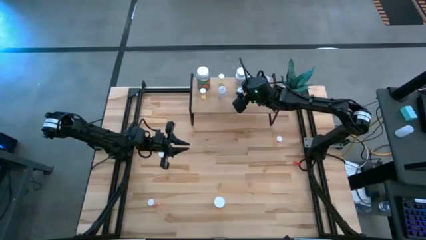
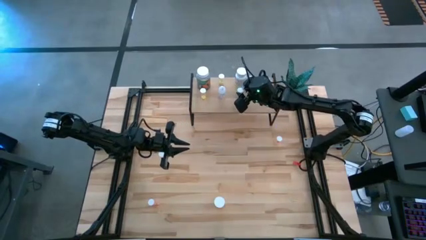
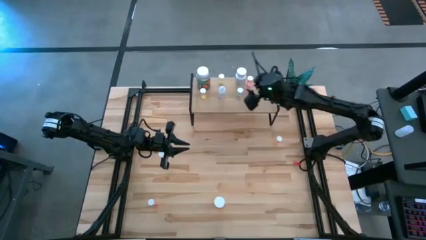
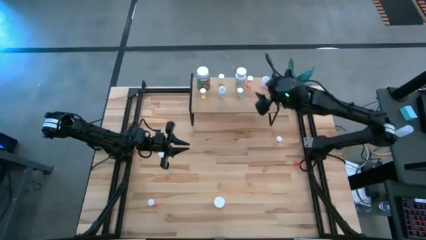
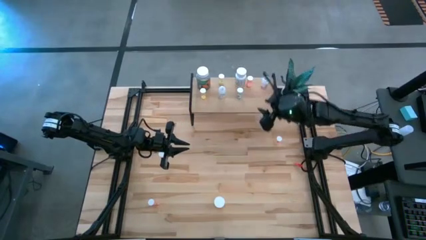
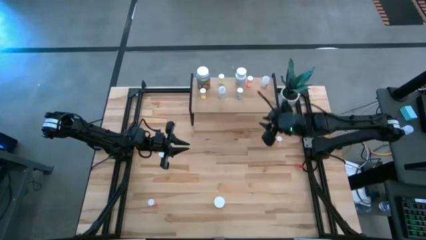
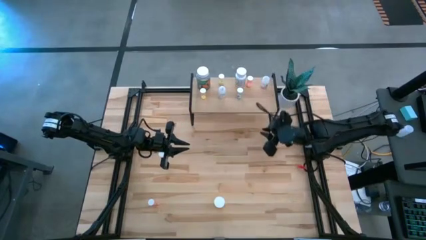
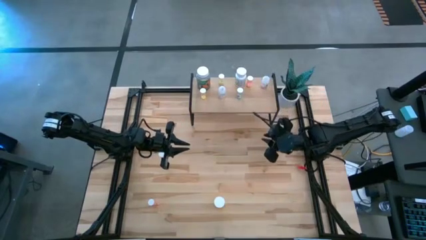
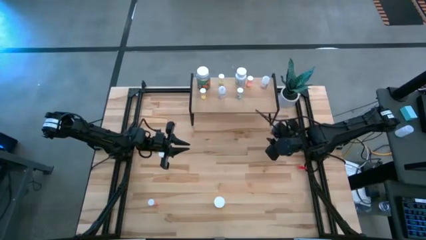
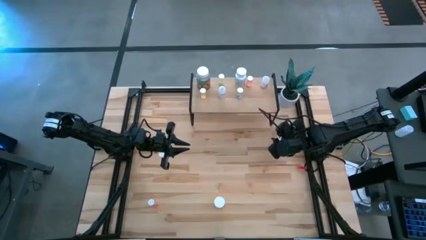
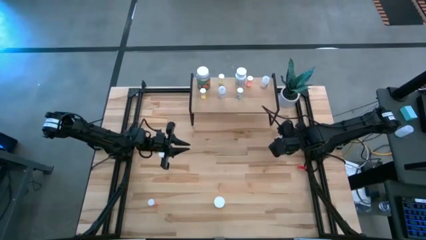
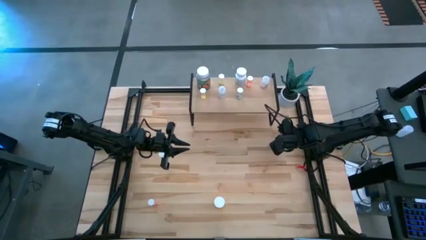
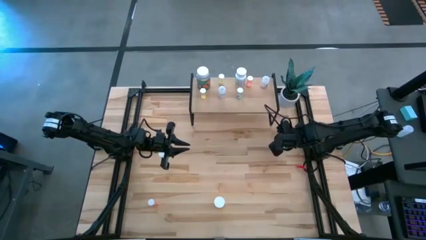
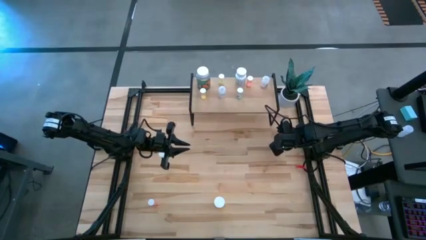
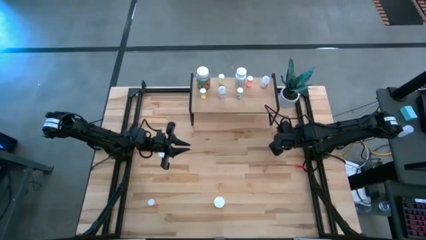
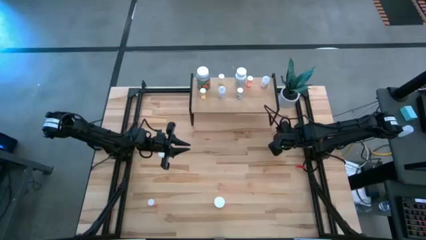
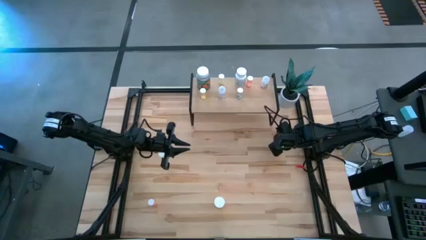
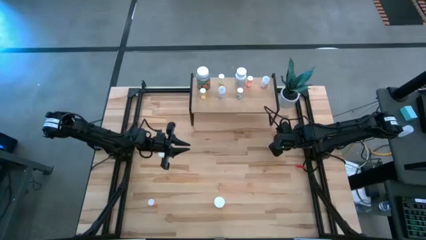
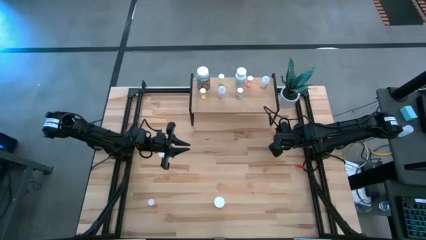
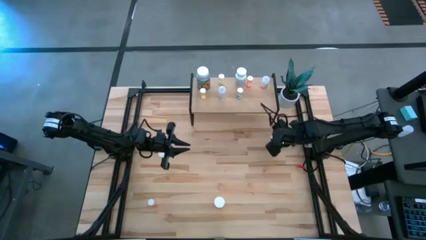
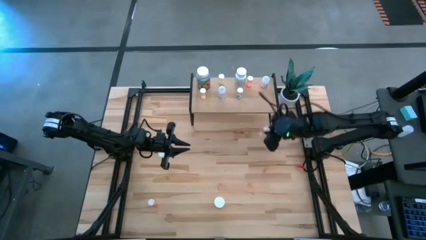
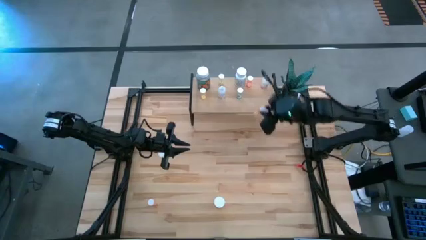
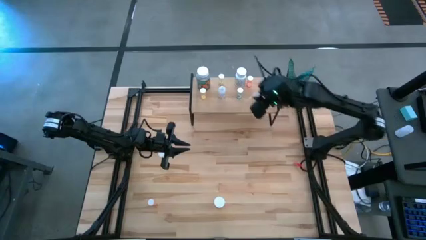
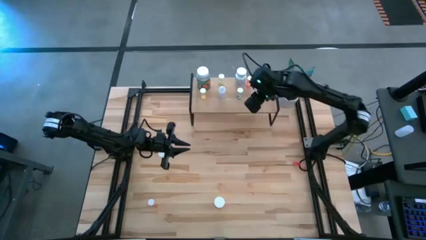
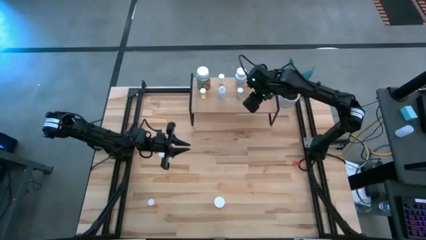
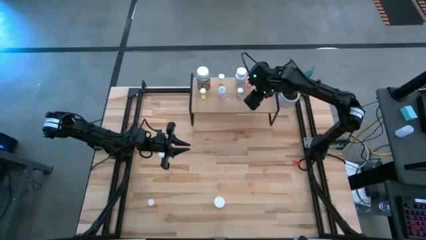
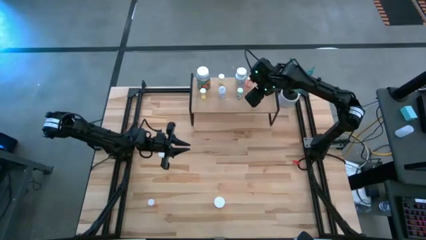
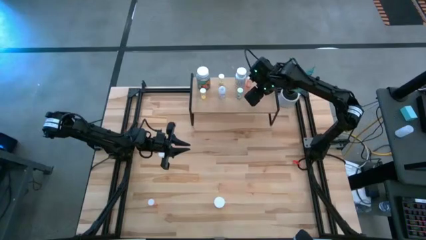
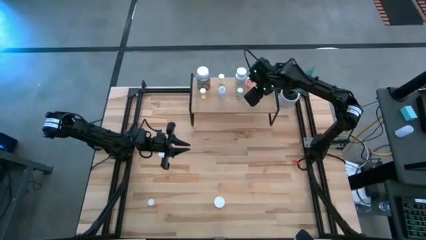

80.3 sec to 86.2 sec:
Task: Pick and place medicine bottles onto shelf by color
Put the top pink pill bottle on the shelf

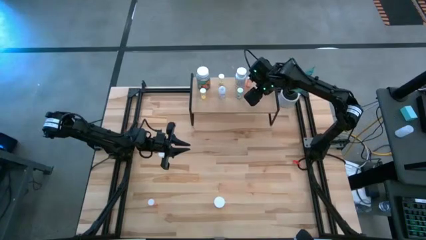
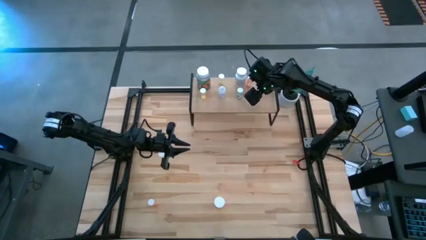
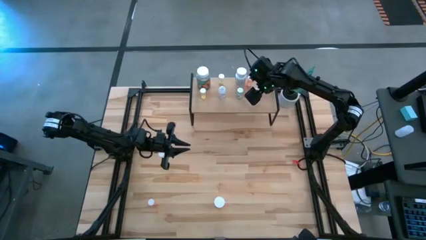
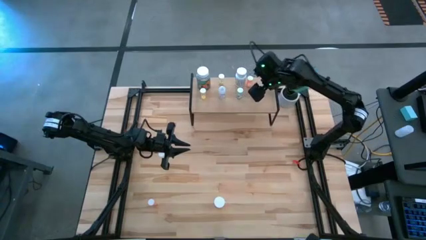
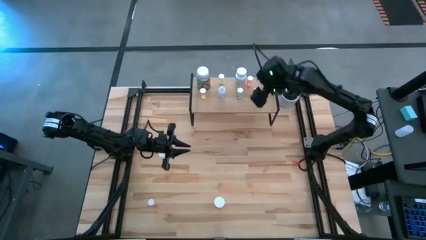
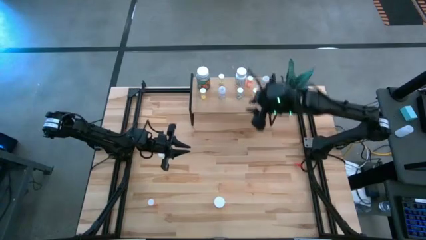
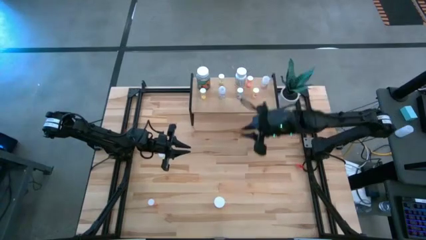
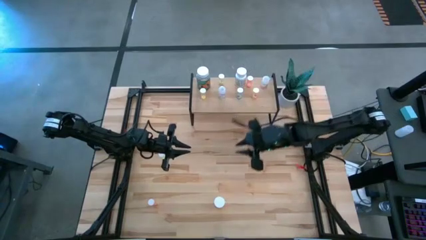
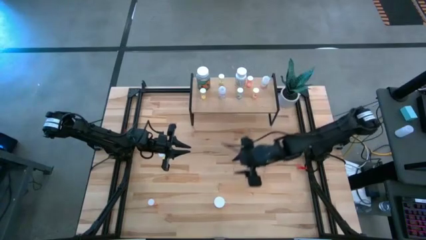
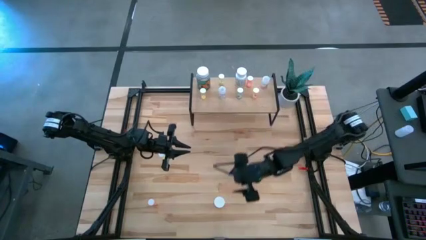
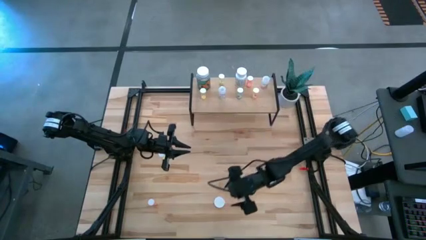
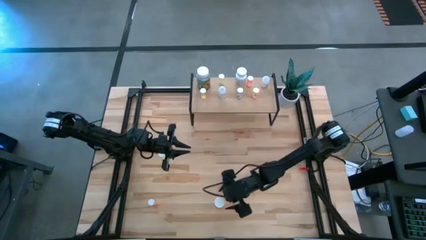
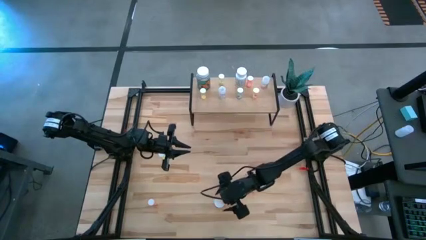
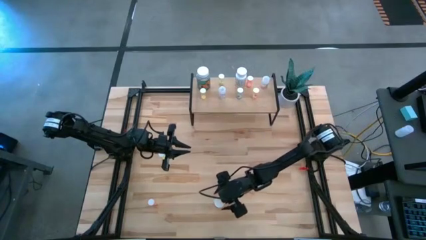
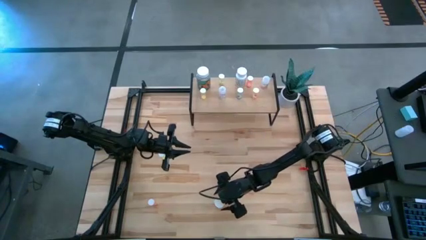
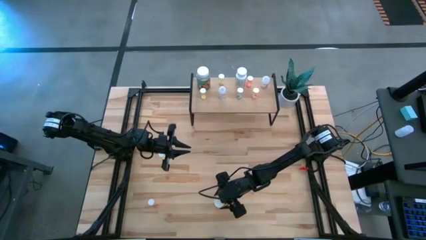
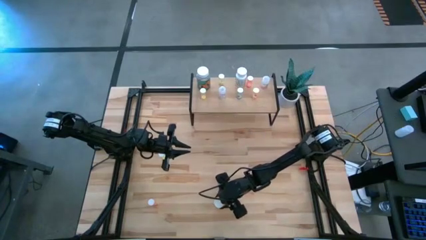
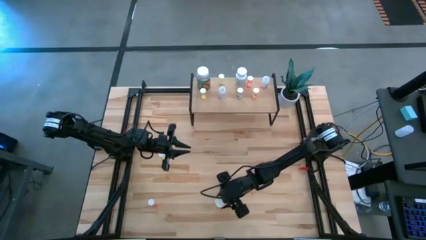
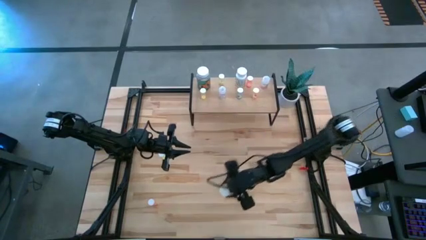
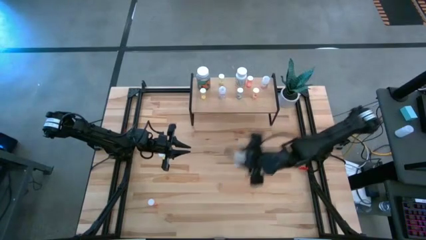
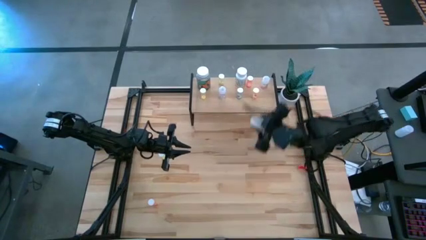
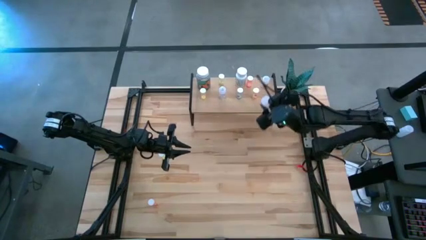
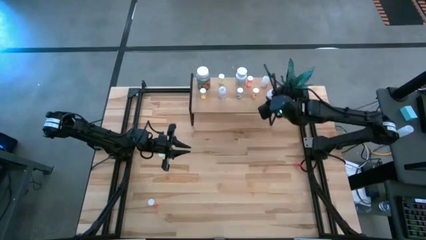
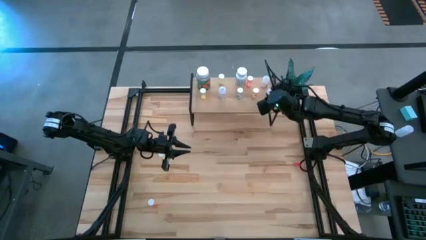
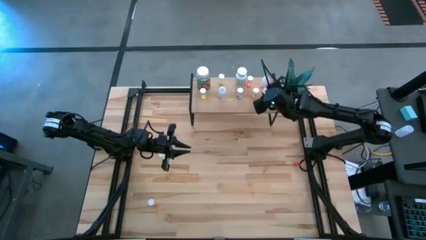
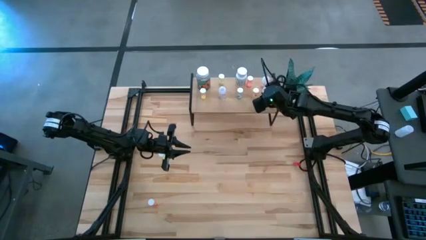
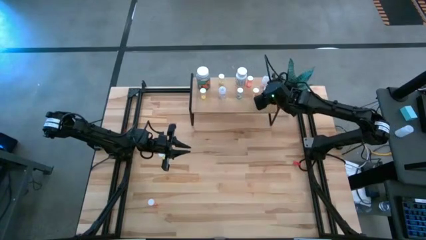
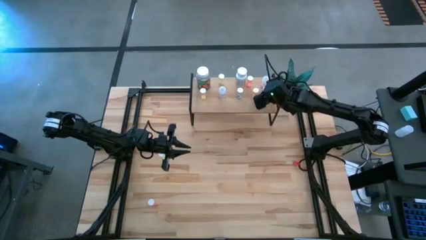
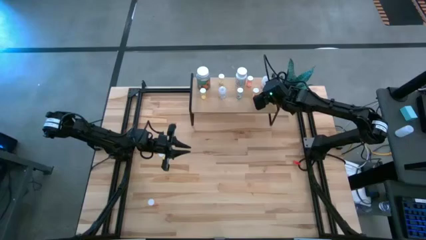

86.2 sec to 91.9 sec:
Put the orange pill bottle on the shelf

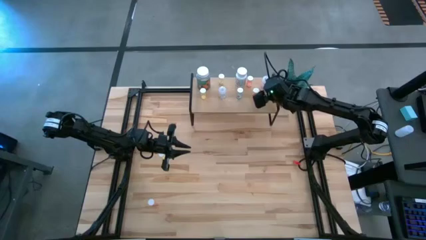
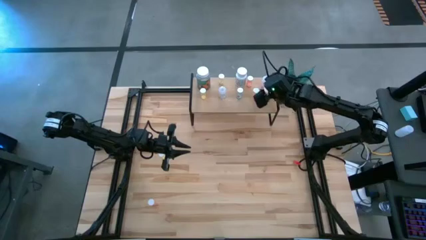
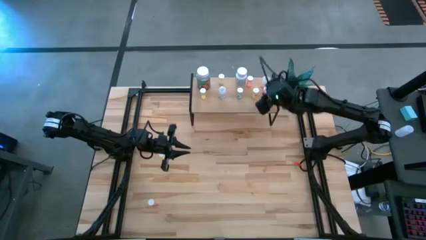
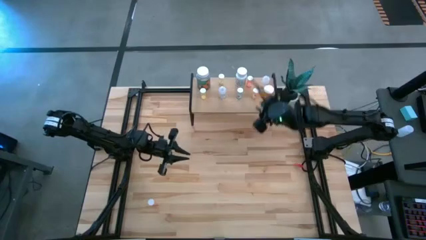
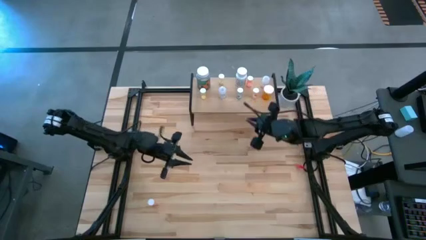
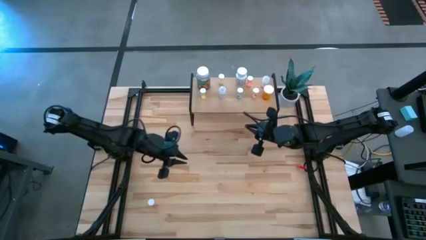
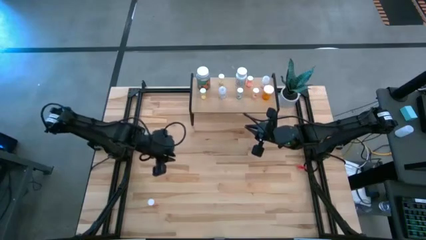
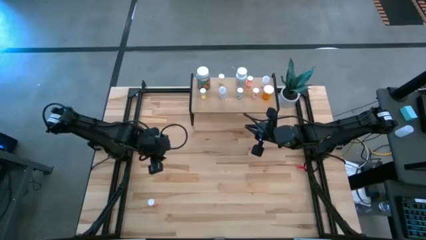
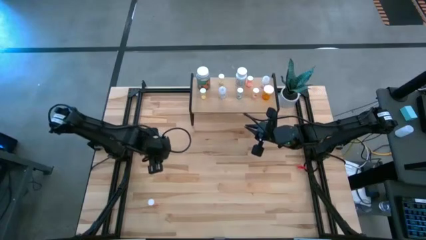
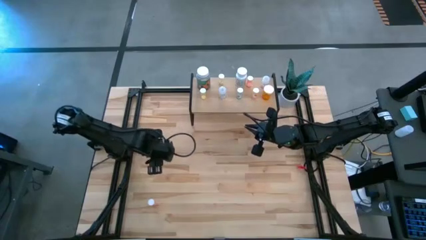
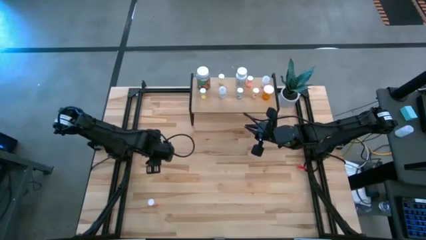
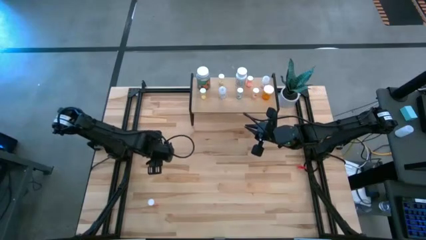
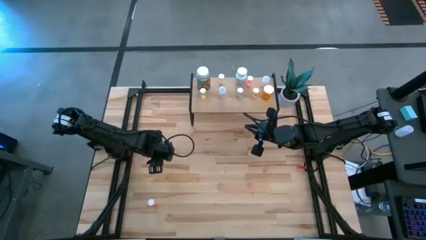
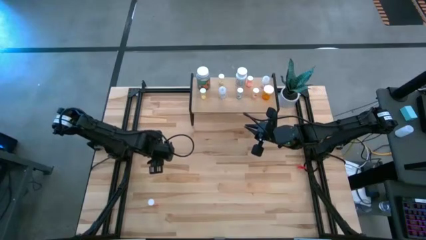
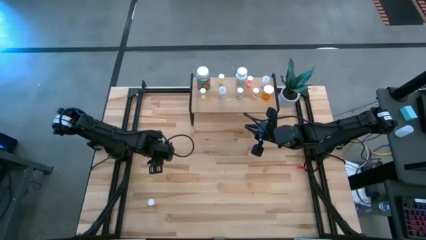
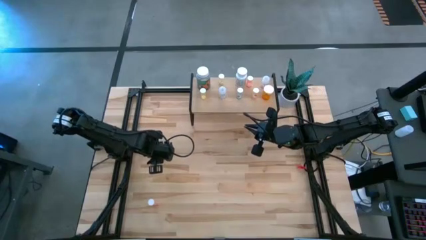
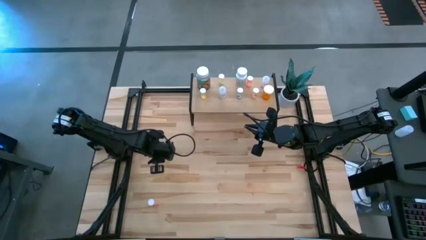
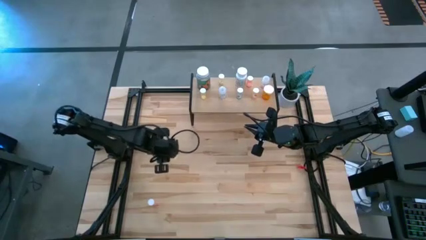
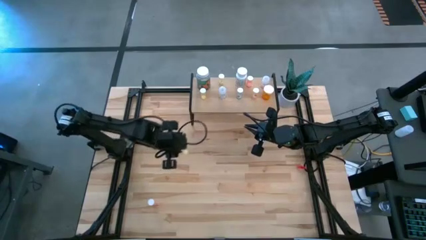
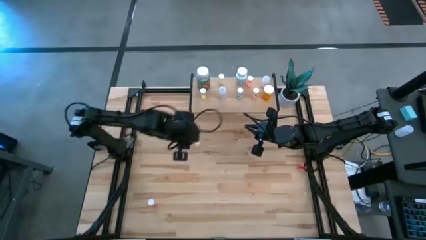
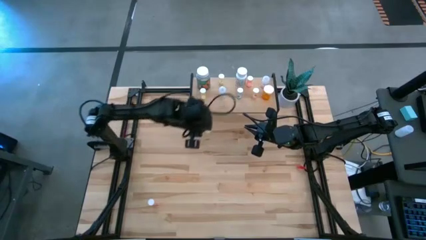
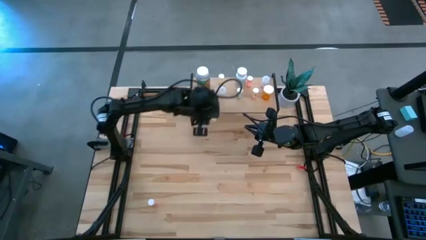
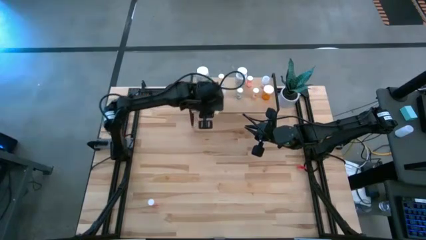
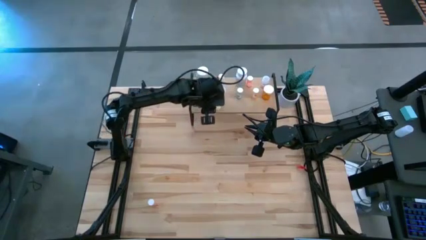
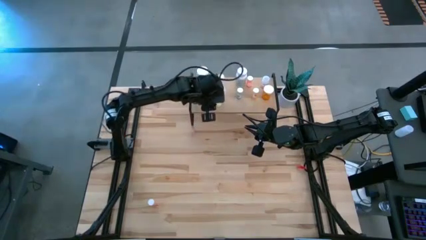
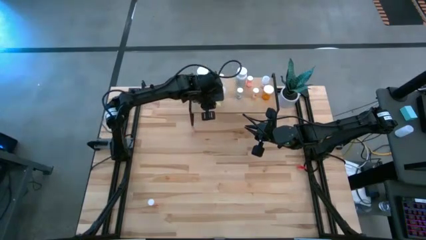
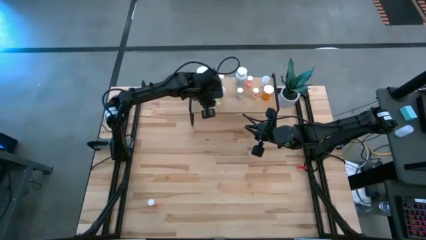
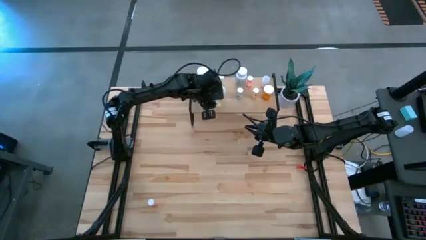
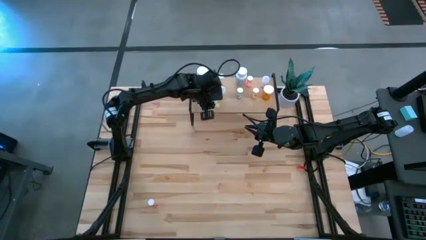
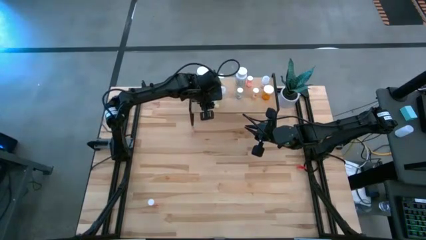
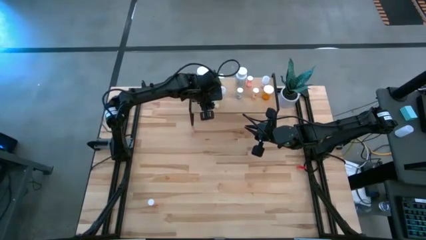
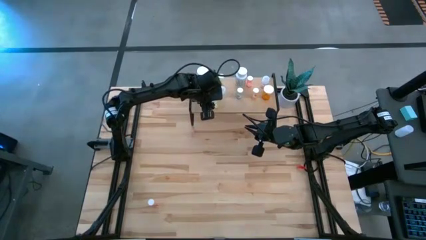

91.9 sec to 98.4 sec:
Put the yellow pill bottle on the shelf
